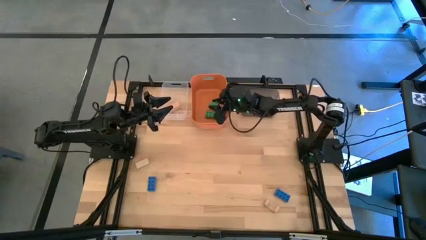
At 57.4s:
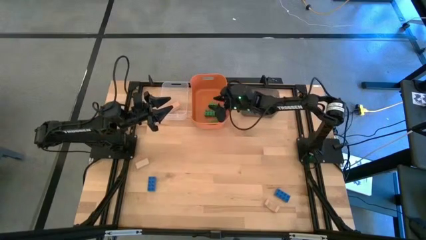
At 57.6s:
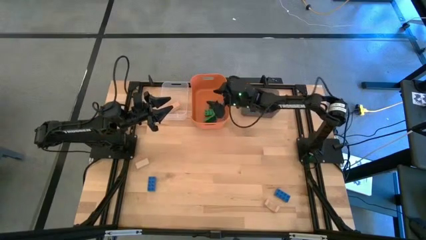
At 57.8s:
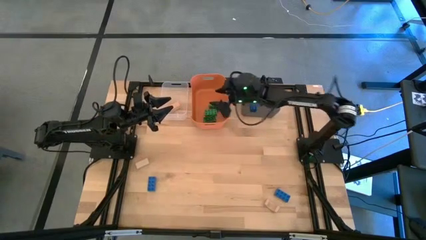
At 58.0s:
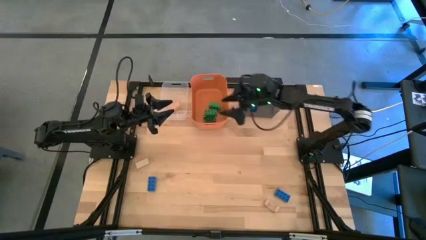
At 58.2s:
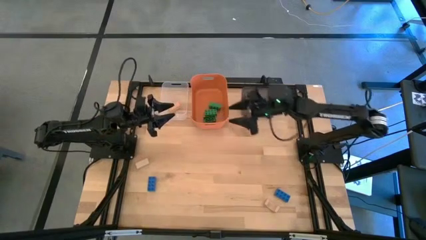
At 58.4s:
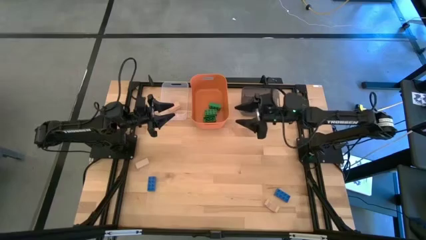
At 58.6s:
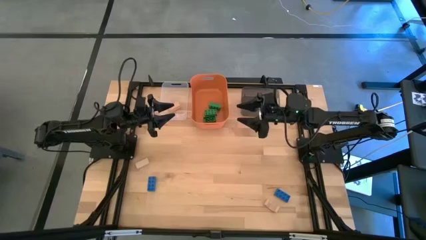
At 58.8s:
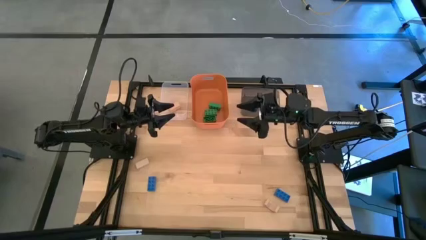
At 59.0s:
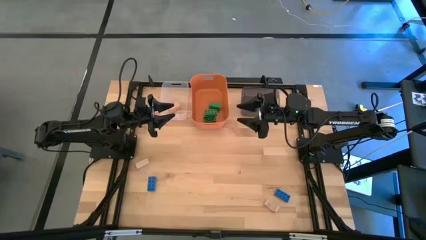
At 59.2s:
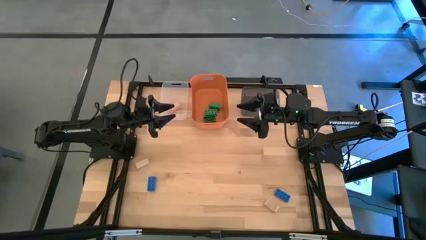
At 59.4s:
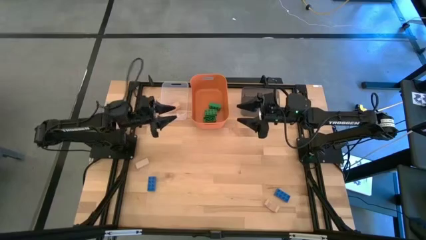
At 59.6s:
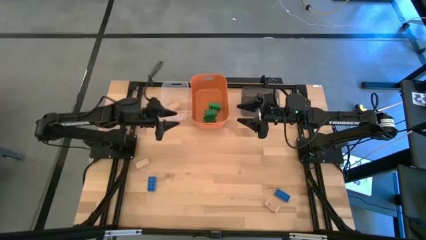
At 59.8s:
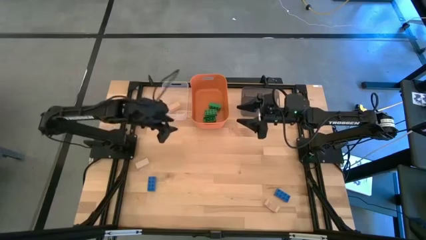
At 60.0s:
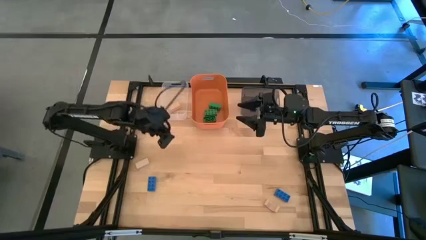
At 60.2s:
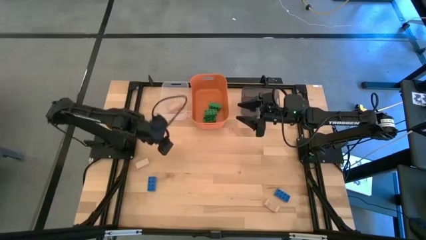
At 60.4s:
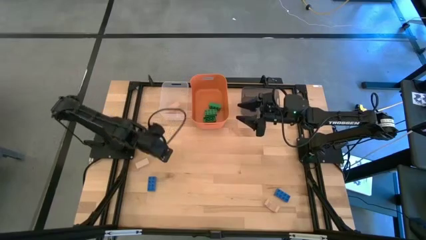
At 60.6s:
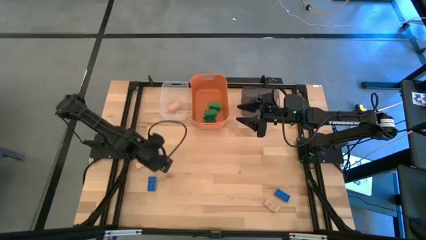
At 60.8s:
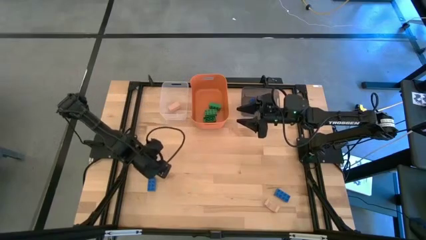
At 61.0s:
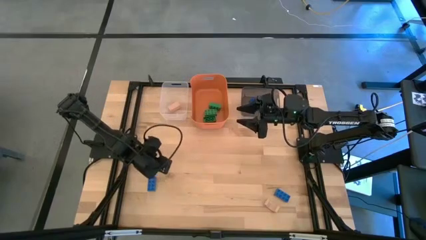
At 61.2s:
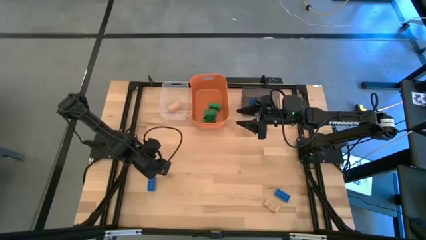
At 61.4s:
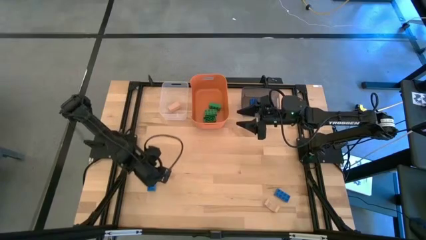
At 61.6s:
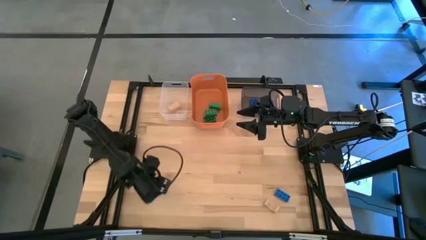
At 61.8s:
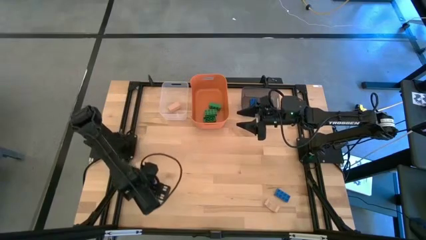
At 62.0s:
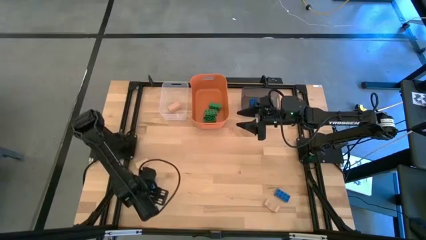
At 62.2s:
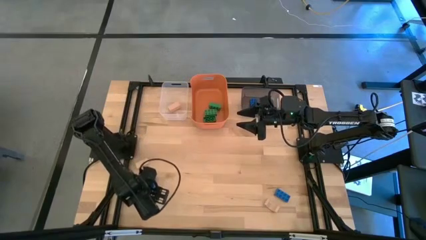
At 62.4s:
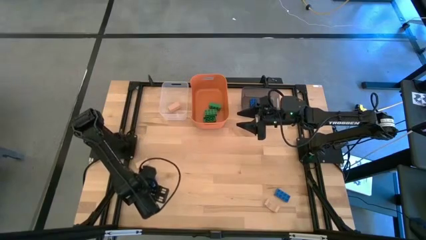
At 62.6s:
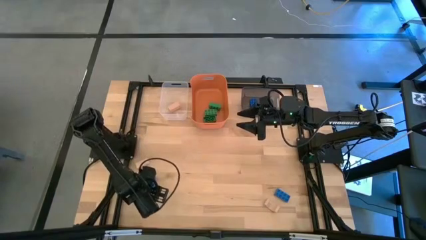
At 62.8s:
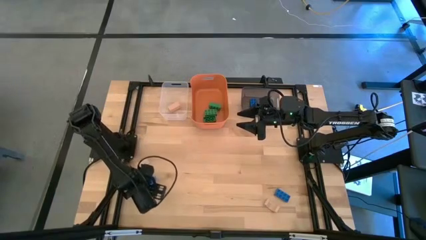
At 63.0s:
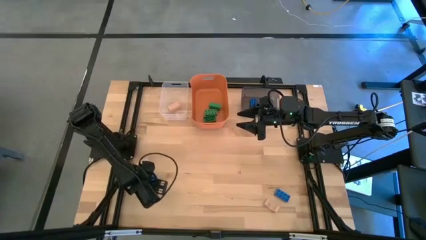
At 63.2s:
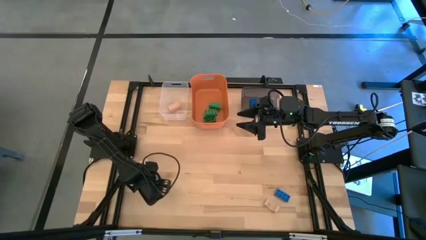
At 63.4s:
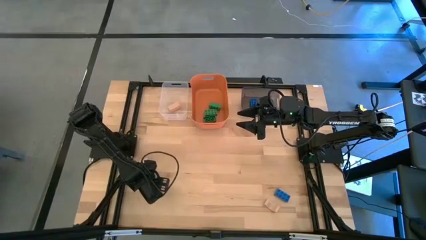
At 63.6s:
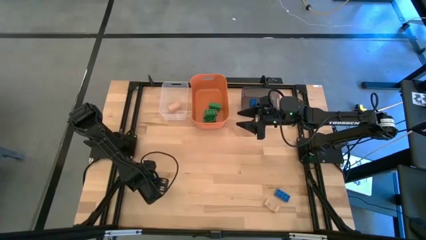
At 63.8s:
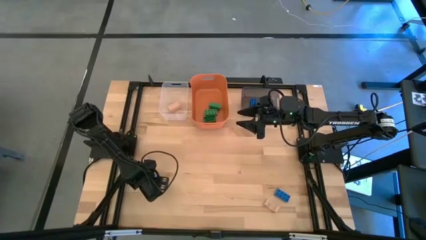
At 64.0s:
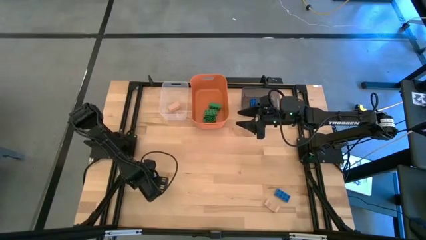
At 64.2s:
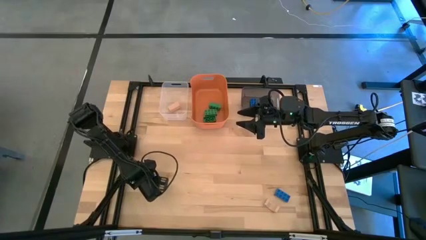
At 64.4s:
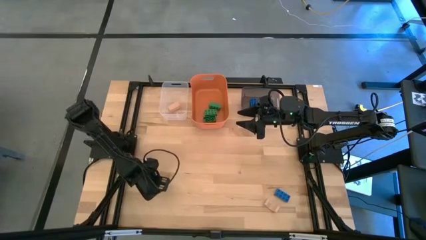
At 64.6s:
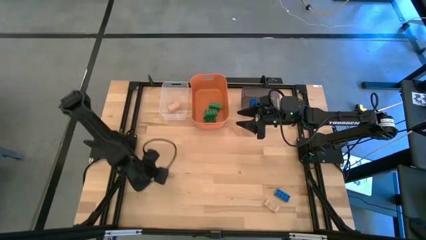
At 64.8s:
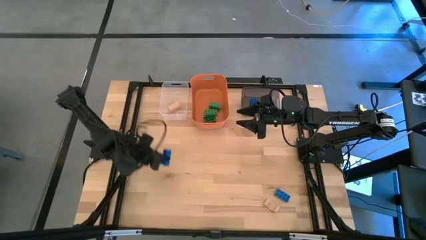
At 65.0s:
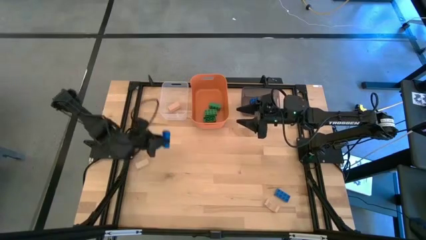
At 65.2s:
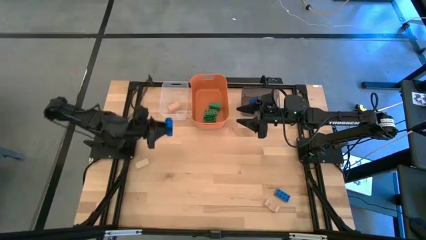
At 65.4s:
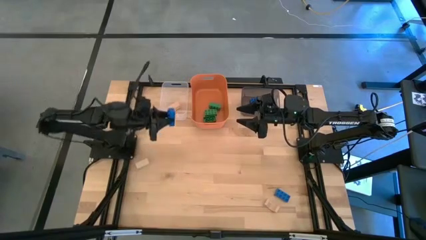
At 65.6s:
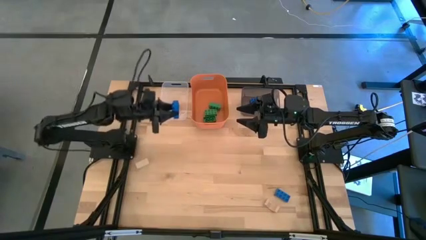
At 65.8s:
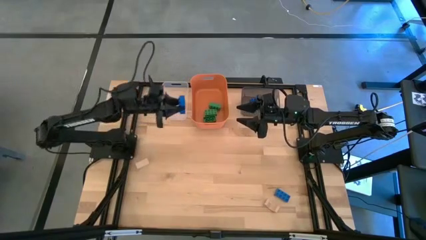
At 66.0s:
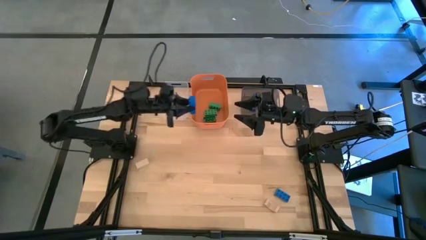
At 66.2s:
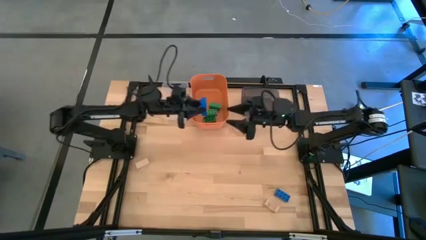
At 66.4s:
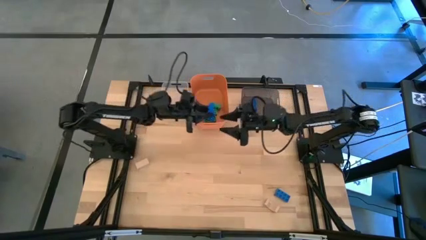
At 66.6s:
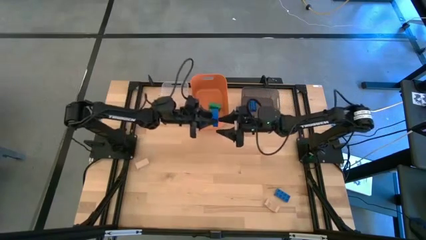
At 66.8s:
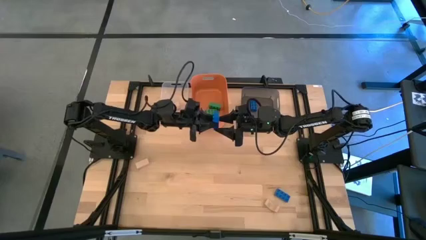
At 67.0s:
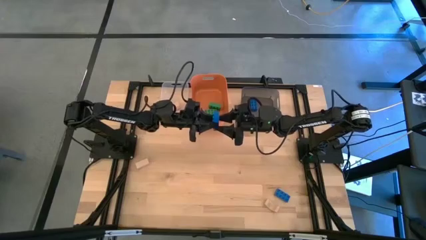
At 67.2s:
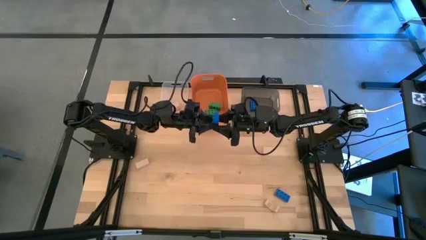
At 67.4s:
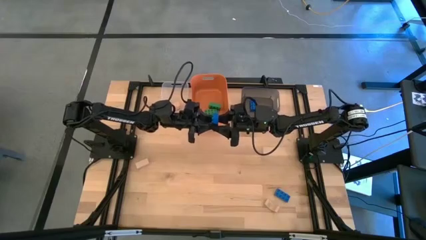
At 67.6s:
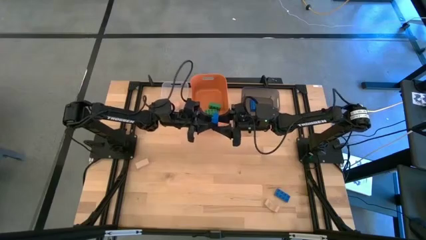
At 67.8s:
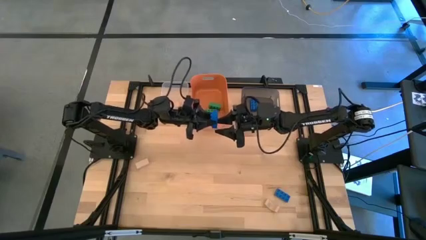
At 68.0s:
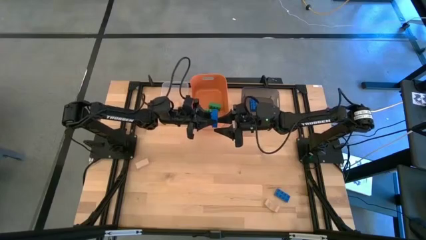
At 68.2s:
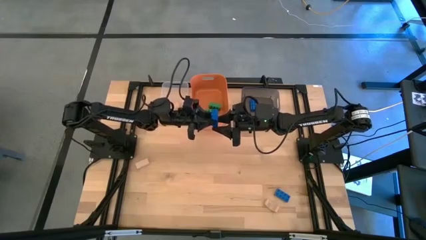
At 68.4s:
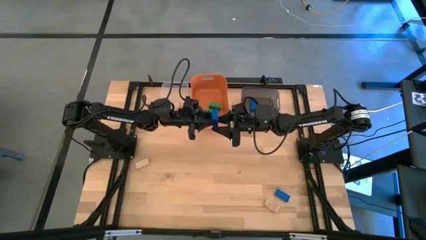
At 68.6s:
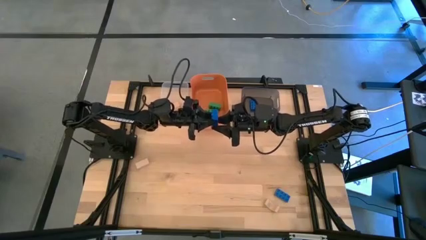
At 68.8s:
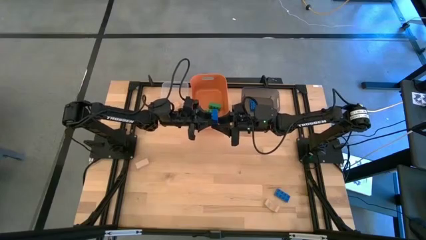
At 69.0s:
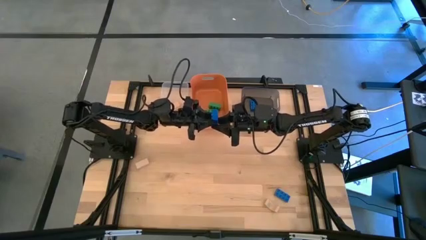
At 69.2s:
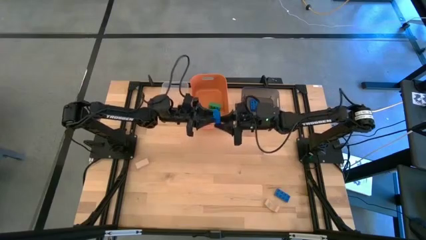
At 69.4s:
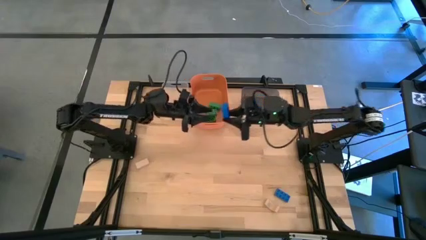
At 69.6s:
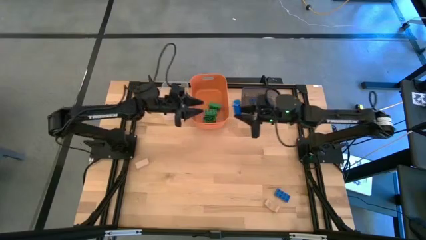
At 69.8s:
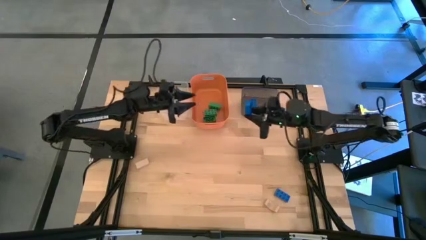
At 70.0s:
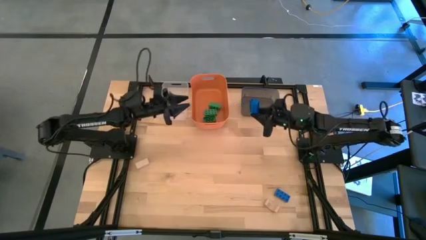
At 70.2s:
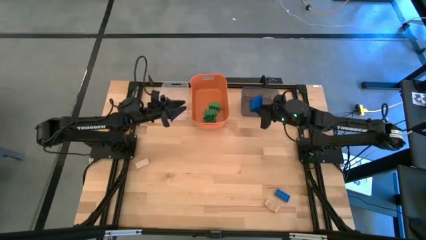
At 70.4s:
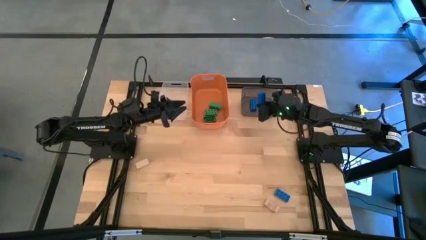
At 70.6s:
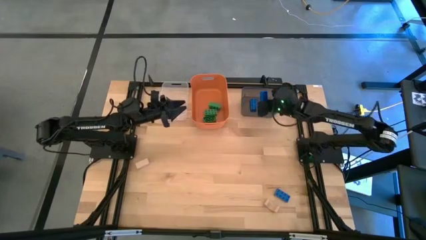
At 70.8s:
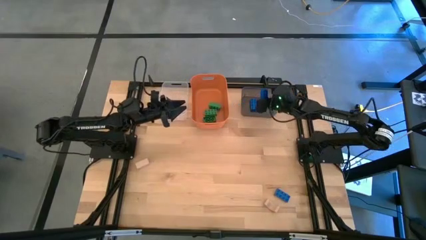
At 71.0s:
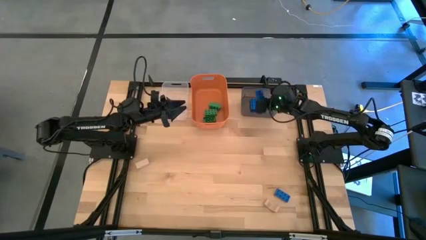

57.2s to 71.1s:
Task: Sort & place blocks by color
Put the left blue game piece into the black bin

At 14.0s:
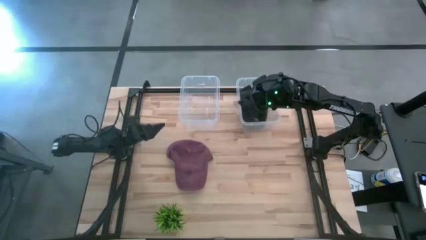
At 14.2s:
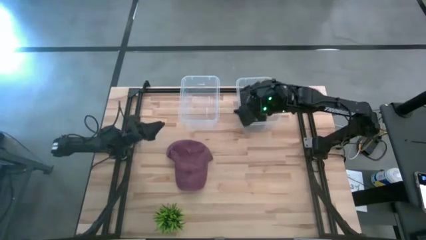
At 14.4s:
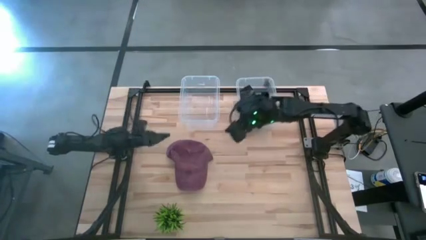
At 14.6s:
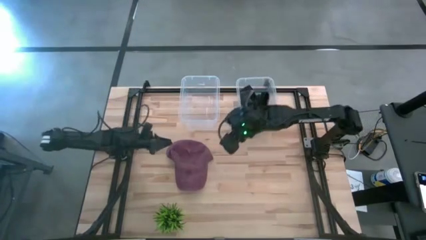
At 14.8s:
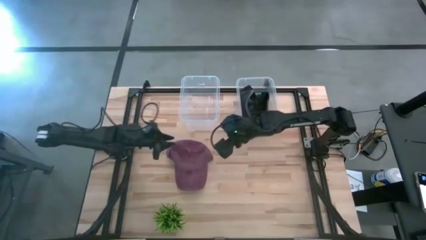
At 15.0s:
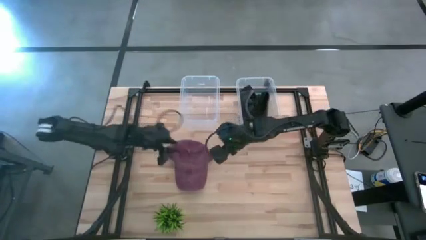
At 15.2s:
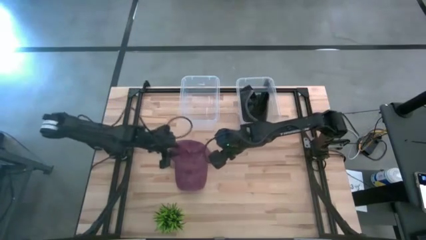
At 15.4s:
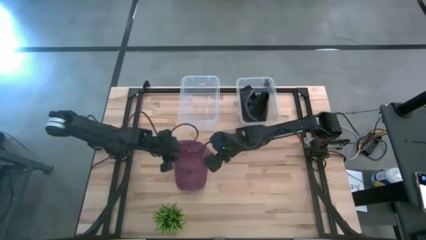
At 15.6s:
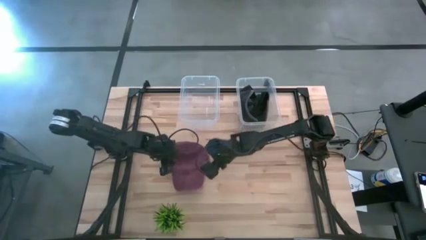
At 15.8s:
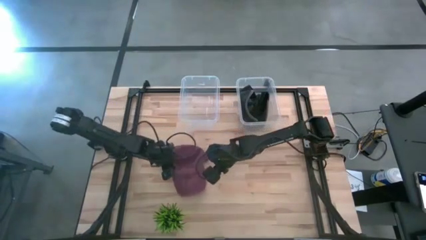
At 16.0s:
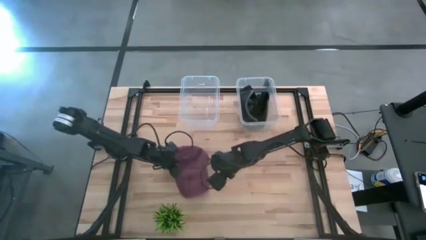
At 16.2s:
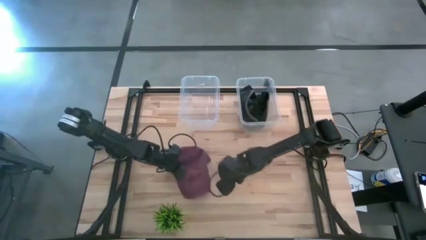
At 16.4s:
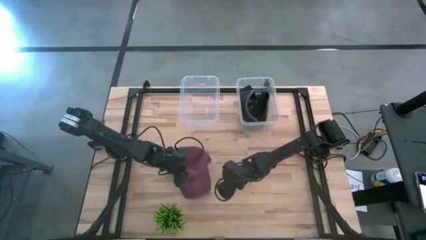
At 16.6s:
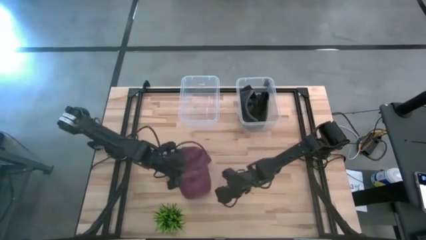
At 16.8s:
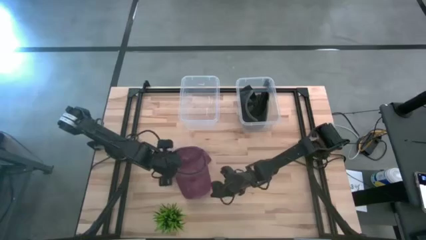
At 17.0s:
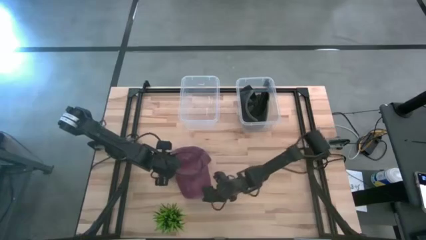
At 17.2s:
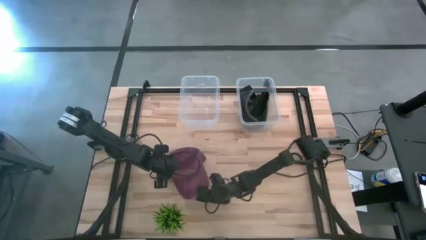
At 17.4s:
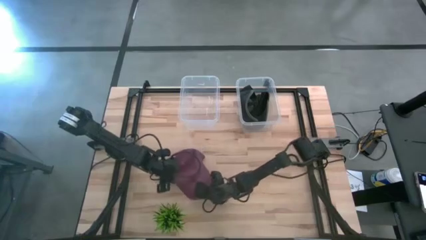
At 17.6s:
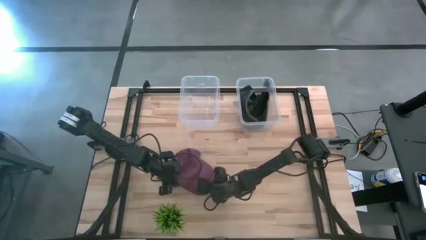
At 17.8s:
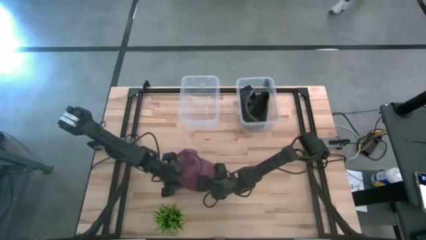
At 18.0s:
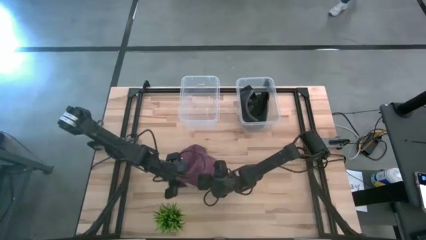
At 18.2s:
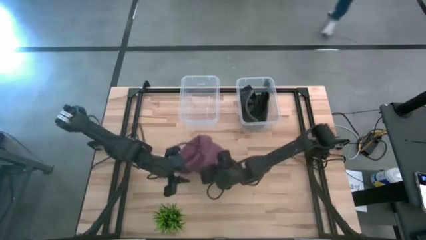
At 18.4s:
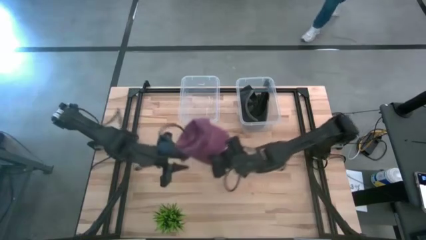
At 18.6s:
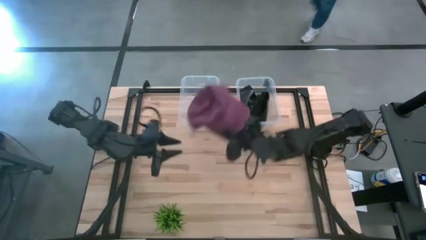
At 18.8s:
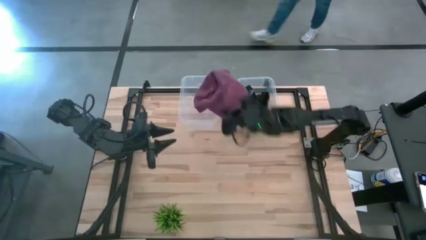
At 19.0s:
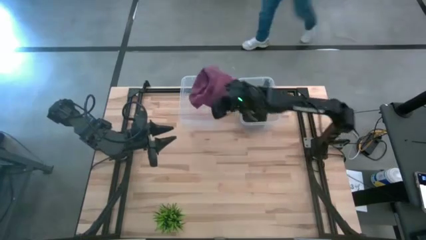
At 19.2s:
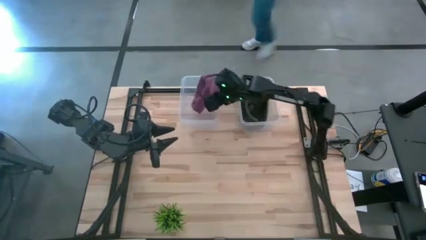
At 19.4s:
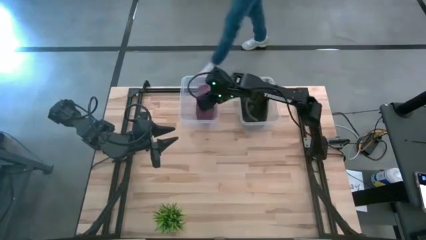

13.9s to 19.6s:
Task: Pick & Place hat
Put the red cap into the left transparent bin
